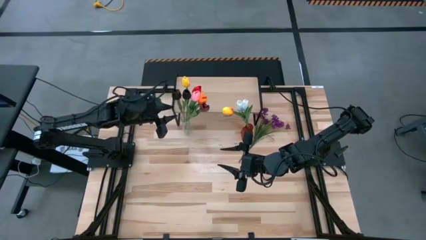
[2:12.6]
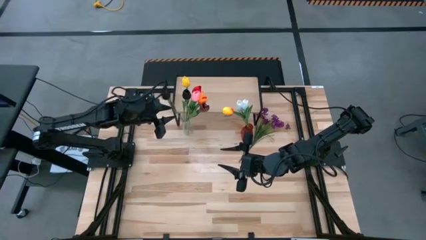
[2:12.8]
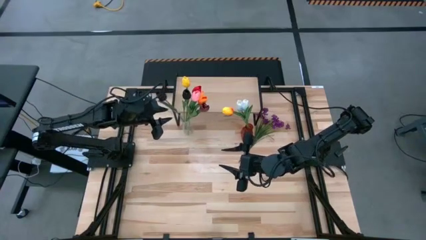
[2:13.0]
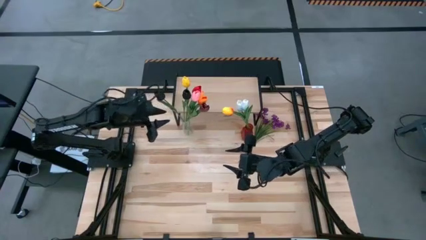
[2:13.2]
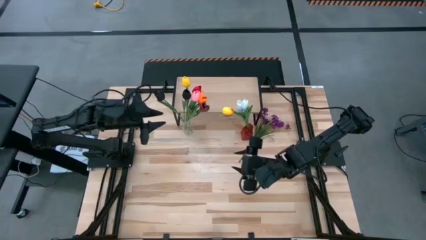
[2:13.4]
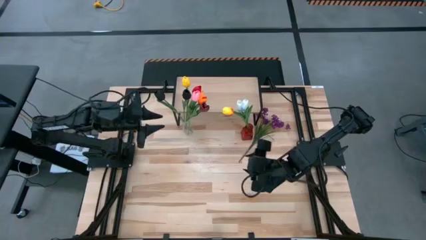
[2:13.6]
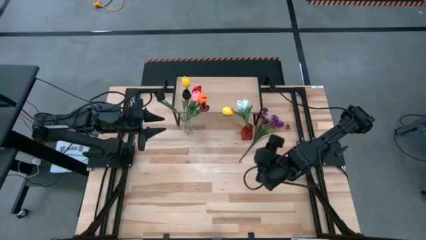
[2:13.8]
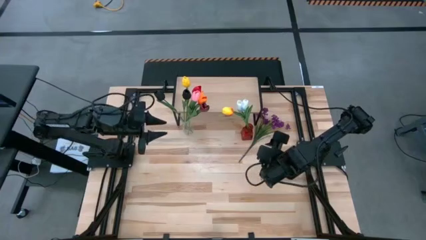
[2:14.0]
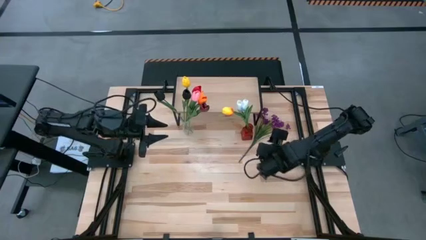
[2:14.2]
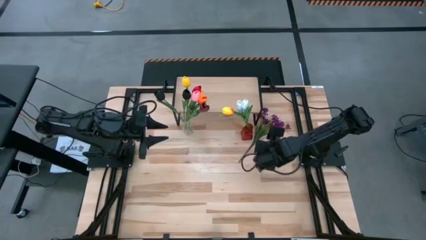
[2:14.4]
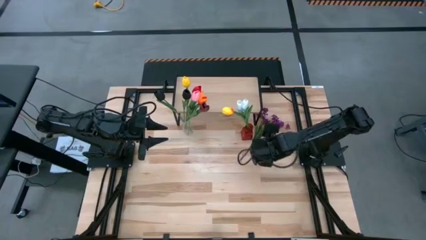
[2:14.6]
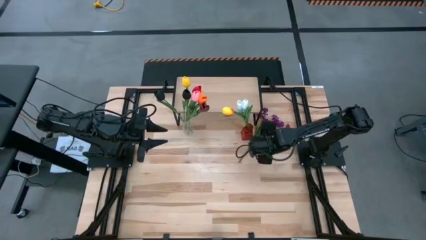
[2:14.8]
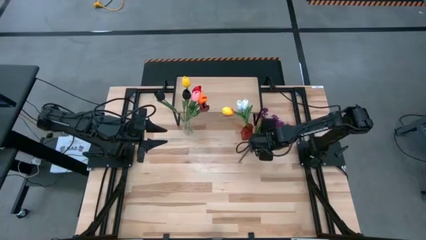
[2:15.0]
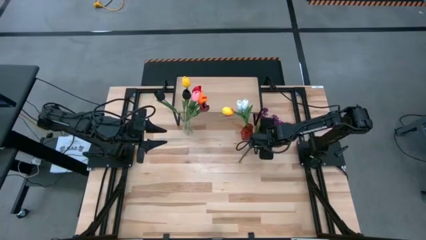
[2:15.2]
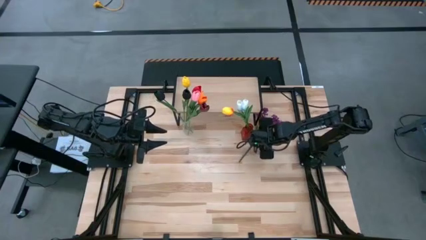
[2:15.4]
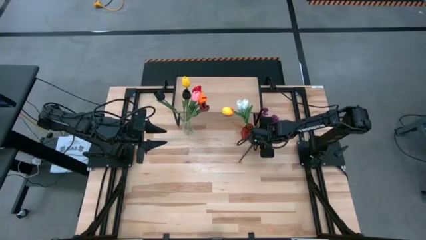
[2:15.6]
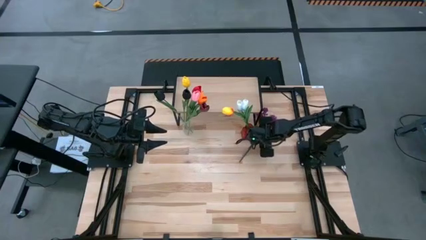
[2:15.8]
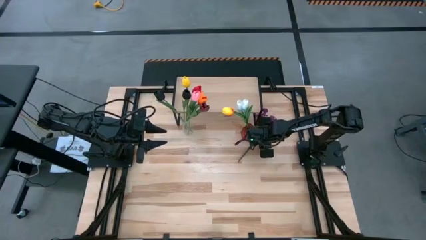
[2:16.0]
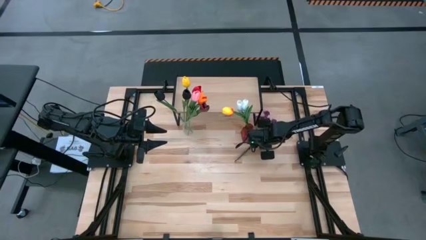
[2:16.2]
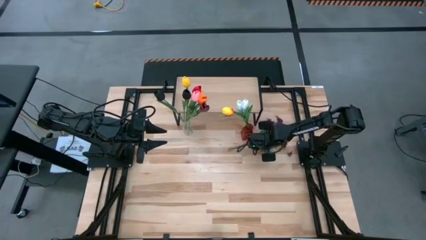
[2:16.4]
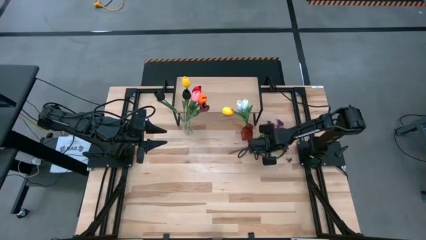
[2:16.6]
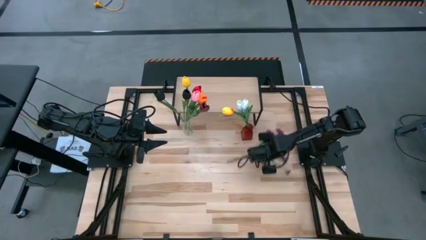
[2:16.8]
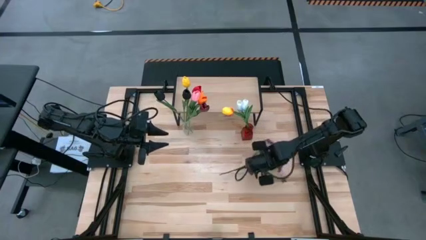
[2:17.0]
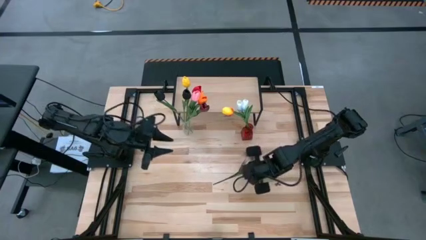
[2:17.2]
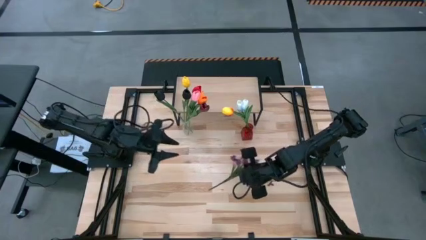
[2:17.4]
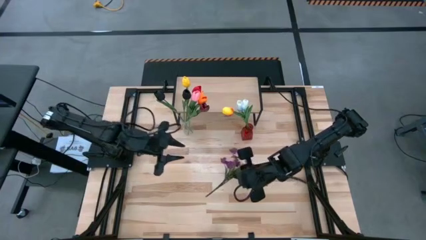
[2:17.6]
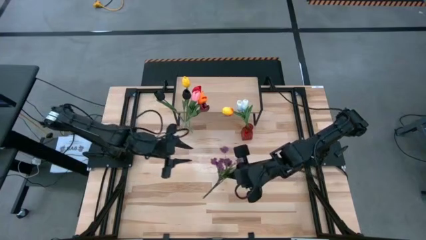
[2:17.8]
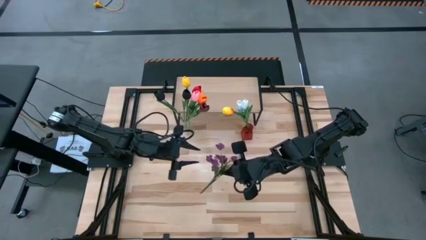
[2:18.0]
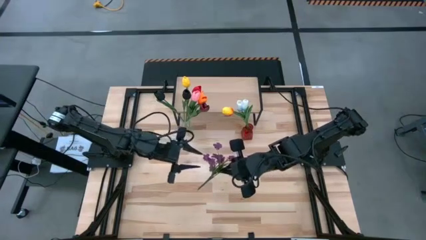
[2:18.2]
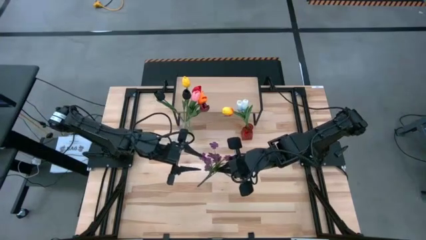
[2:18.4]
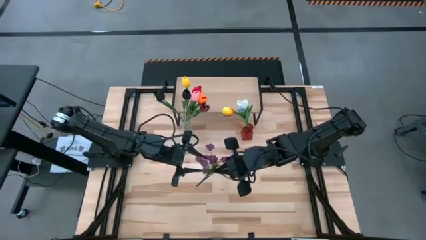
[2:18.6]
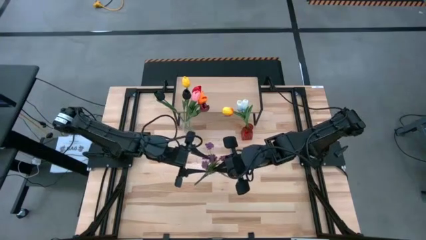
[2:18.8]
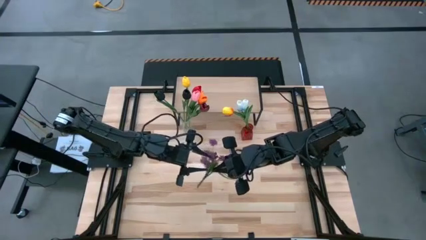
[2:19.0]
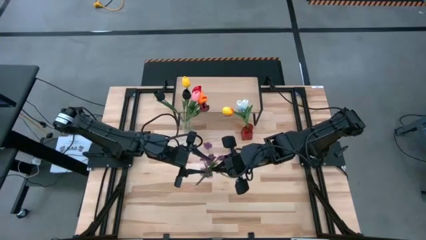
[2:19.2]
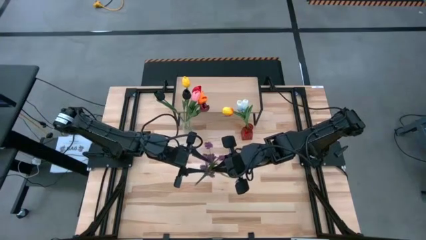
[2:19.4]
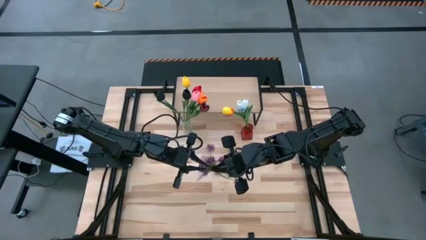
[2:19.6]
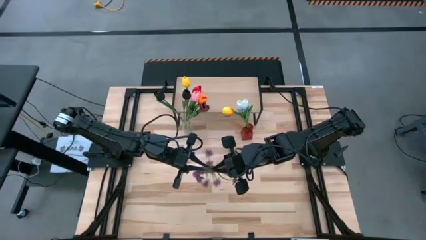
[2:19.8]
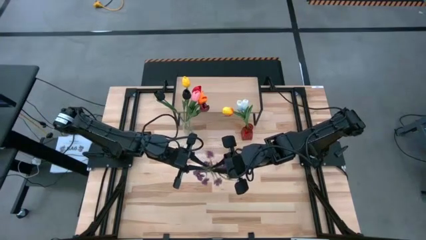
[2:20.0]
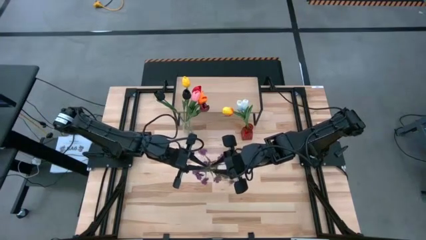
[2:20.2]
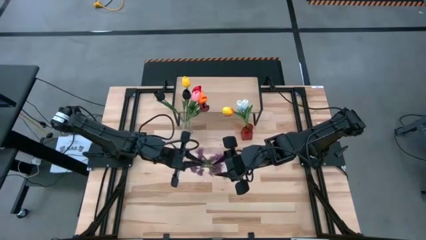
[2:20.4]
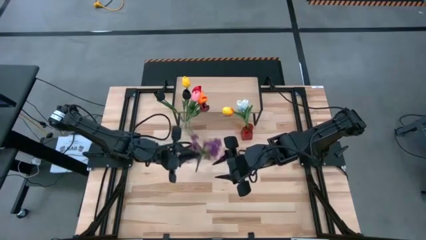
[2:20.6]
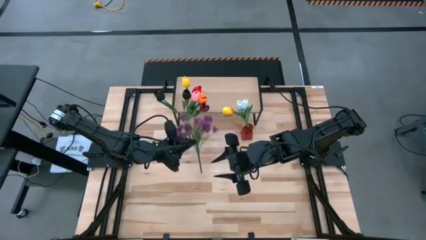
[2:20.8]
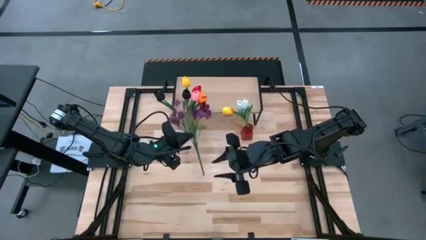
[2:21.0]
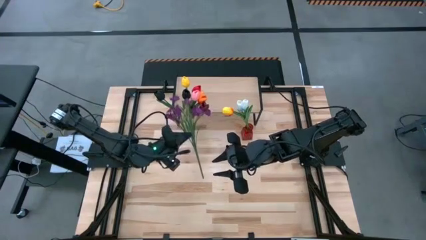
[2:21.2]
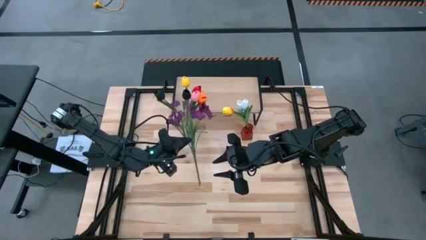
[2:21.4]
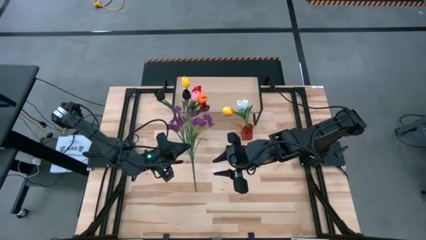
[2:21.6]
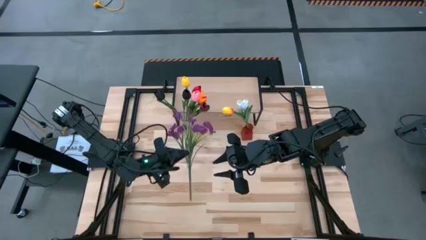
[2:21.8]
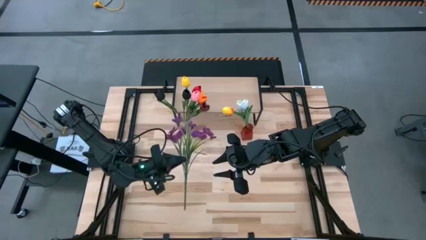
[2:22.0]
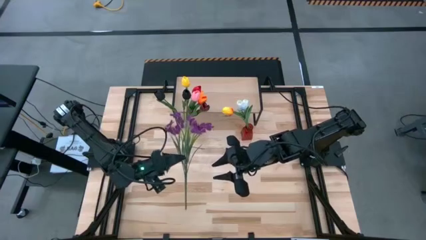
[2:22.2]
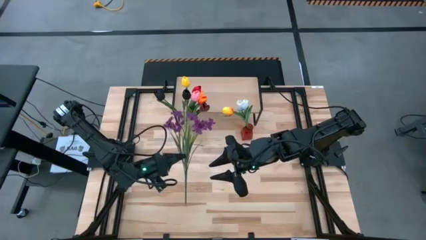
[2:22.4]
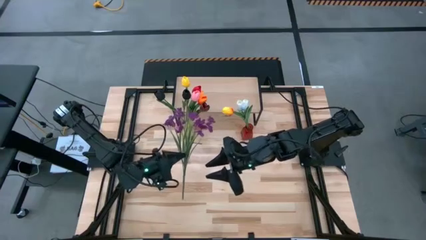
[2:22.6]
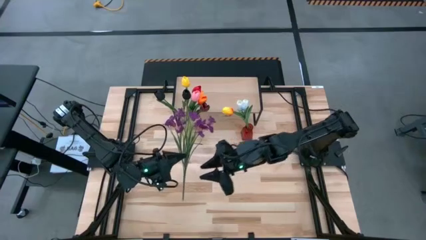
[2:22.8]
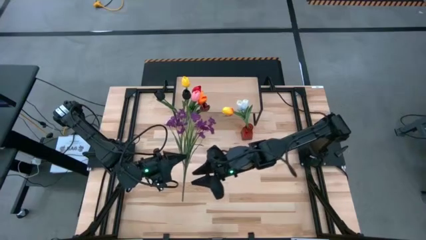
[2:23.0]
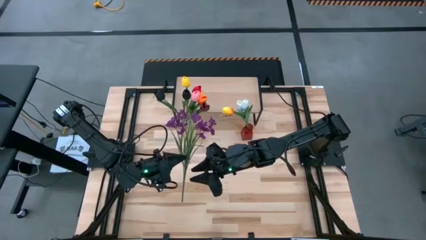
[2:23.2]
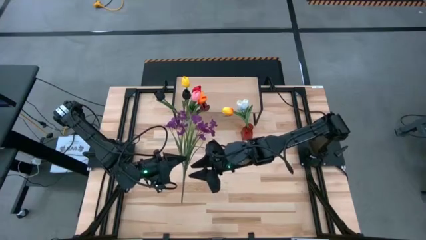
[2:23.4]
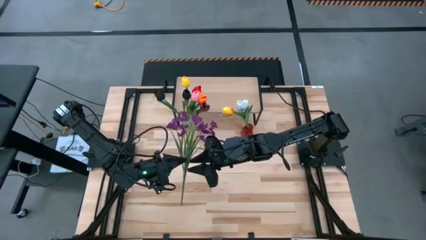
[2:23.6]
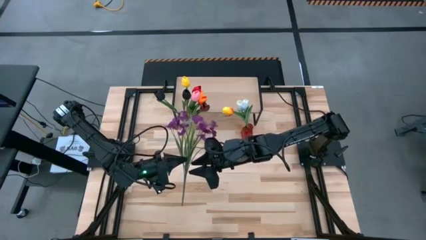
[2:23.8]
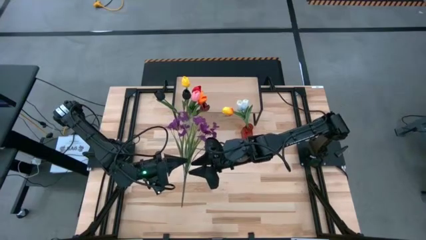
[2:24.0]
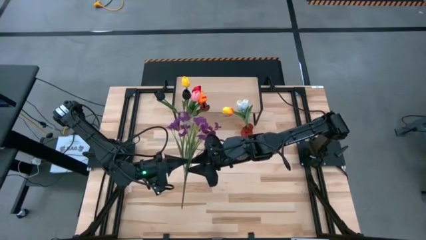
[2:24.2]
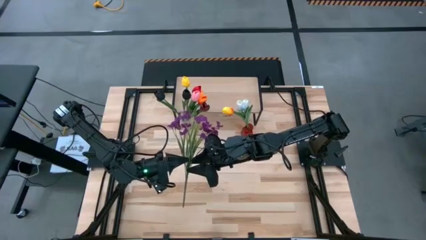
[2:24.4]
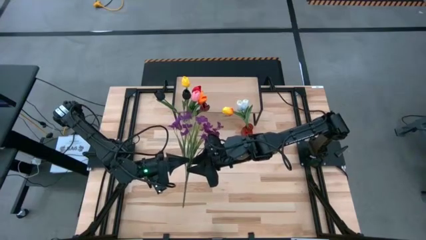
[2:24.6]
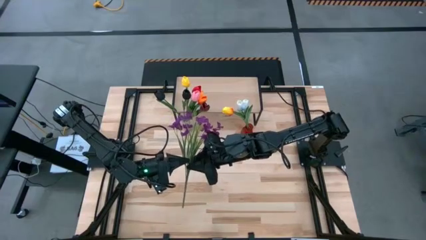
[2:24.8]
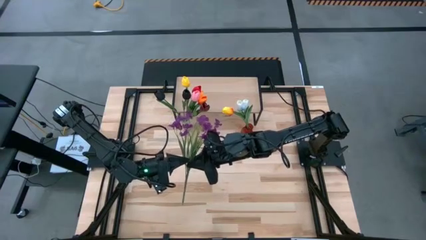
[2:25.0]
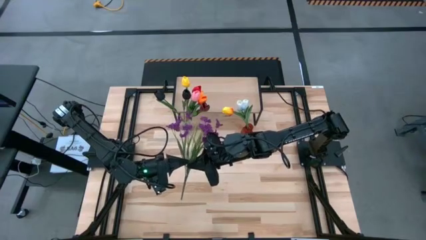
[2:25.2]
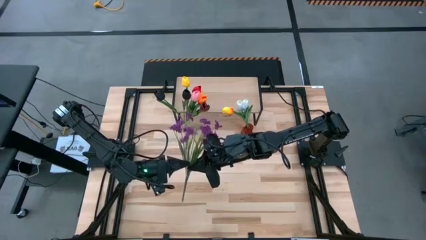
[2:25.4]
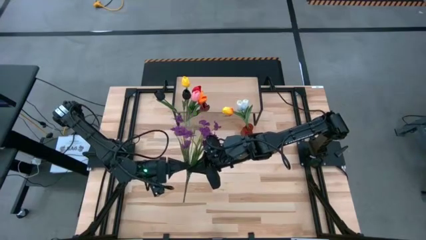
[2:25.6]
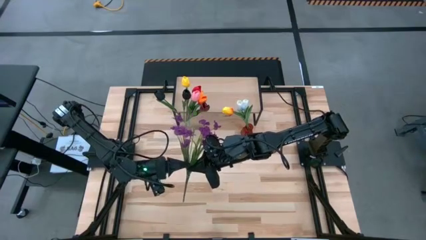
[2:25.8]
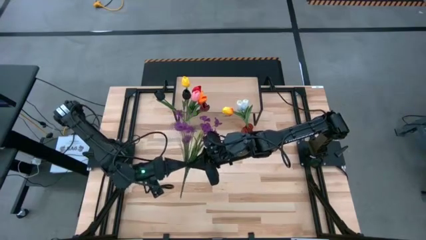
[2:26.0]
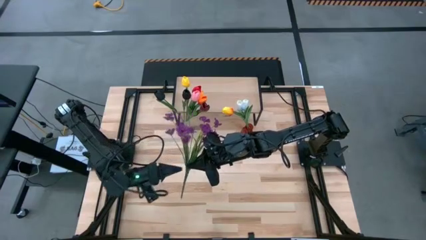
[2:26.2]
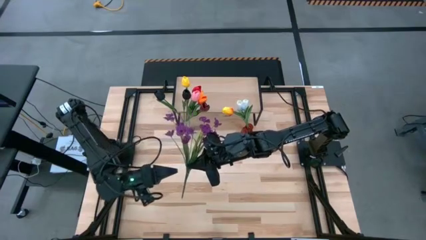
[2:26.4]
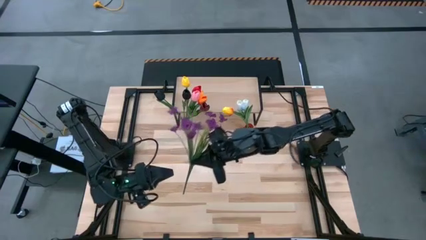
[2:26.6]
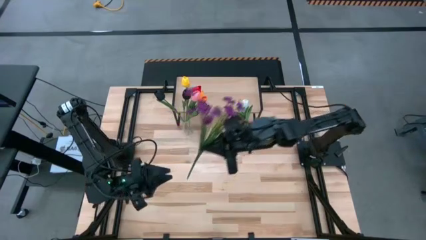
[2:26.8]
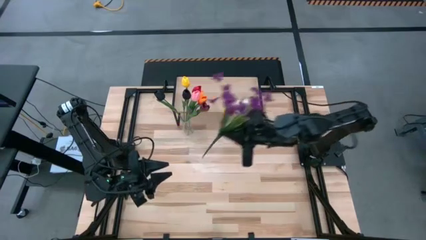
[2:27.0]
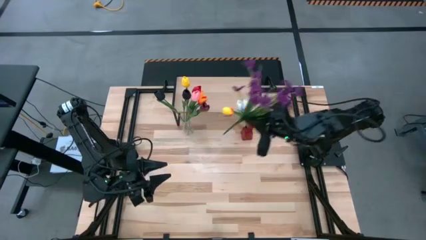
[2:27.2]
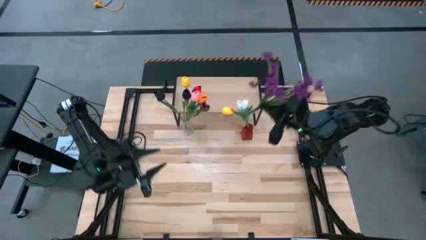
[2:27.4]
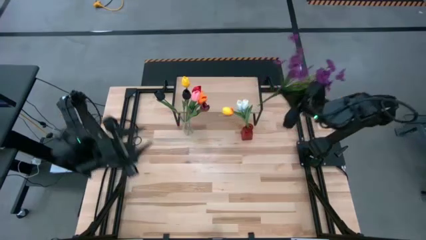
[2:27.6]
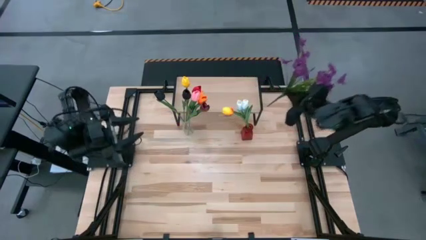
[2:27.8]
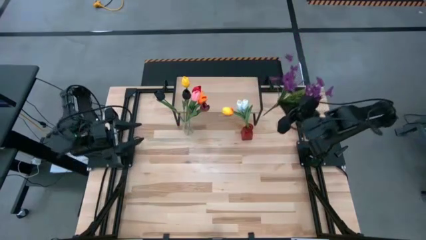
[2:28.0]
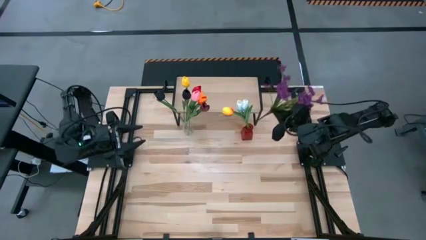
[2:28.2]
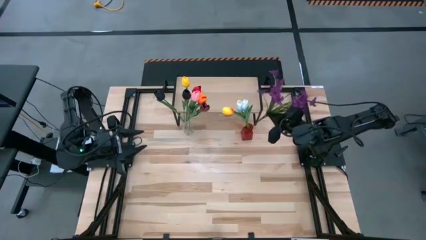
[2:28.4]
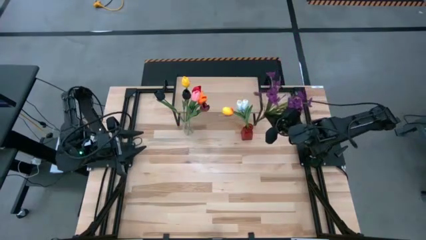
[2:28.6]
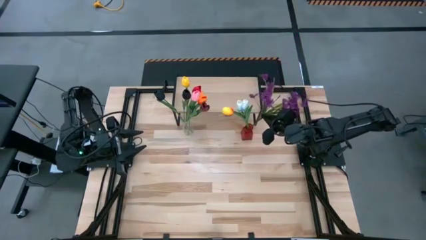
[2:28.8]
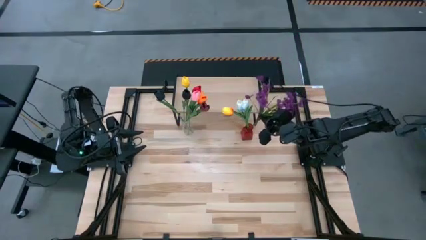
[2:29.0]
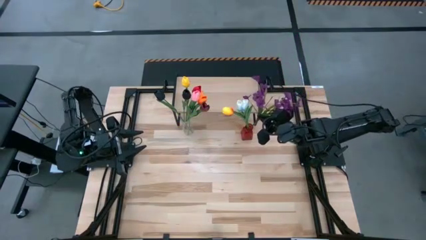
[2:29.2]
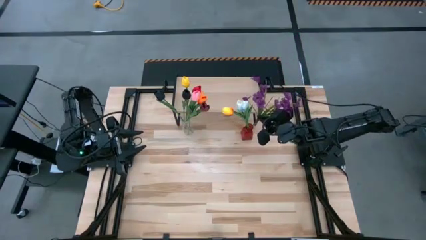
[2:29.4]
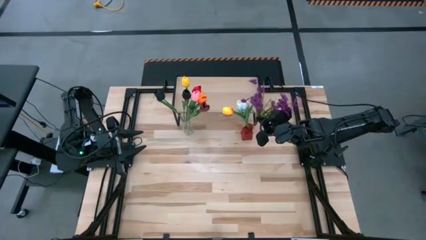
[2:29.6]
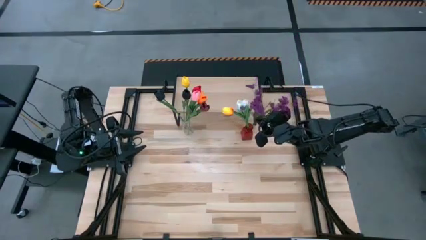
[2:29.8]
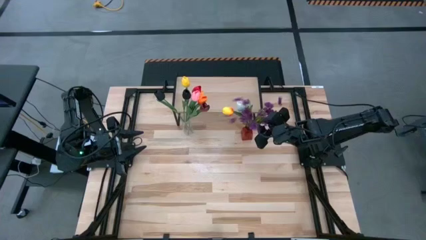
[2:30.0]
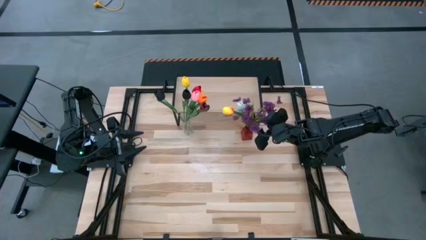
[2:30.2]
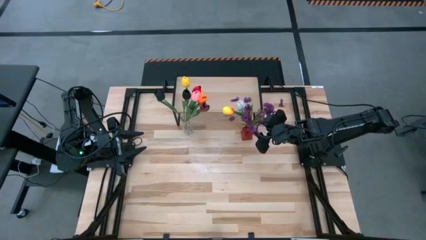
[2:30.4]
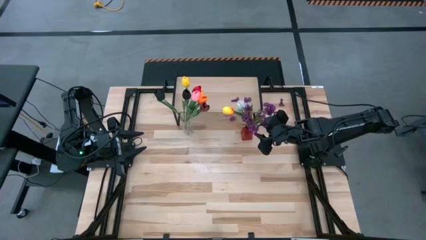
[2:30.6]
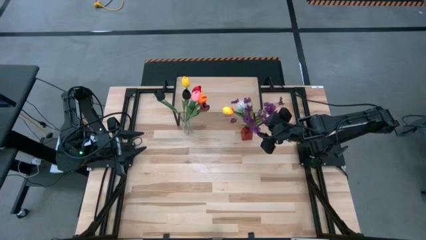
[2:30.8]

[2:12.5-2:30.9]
Task: Pick and place flowers into a vace then onto a shelf
Put the purple flowers into the red vase
